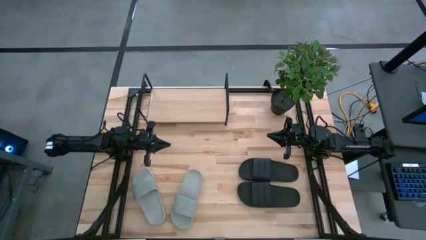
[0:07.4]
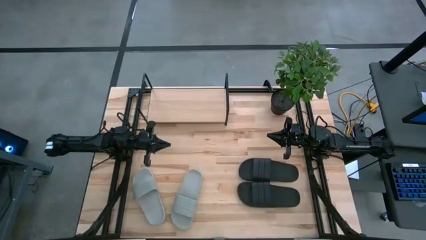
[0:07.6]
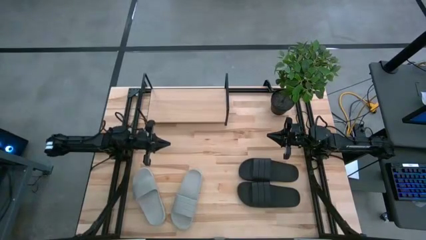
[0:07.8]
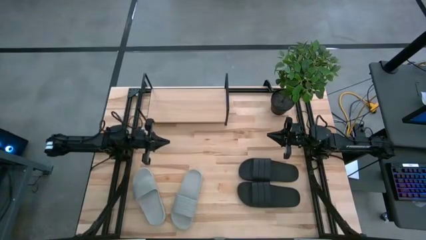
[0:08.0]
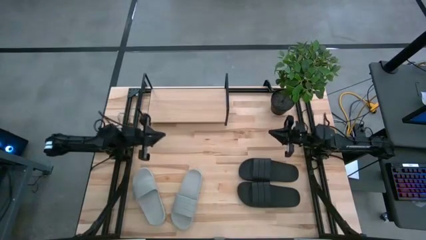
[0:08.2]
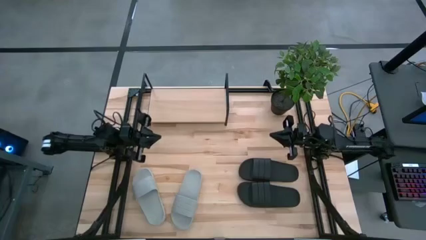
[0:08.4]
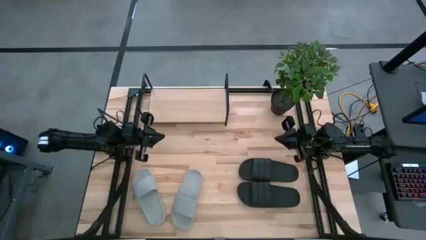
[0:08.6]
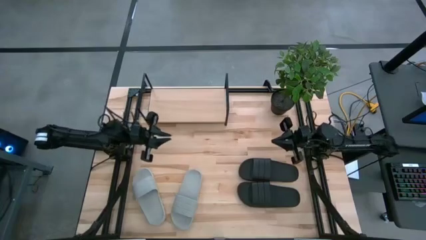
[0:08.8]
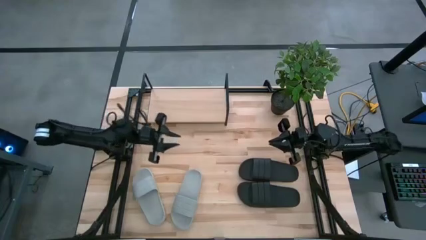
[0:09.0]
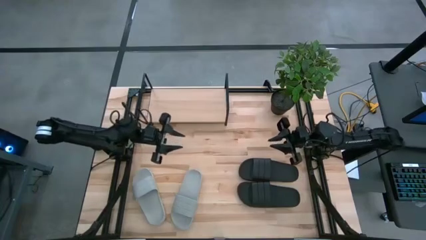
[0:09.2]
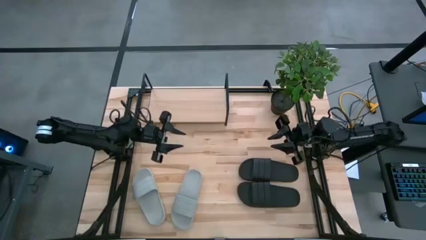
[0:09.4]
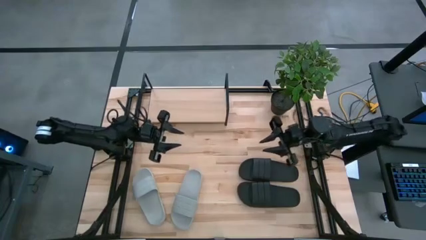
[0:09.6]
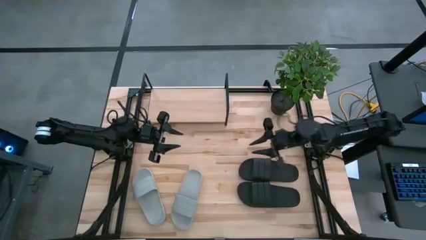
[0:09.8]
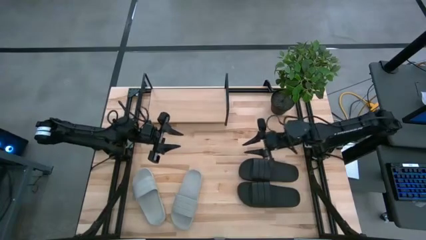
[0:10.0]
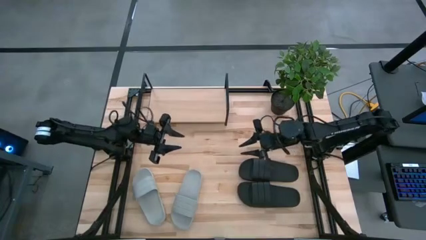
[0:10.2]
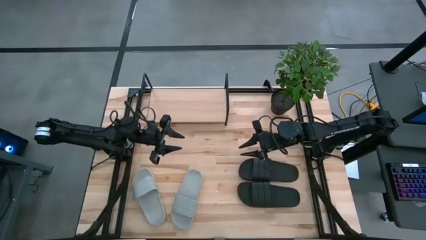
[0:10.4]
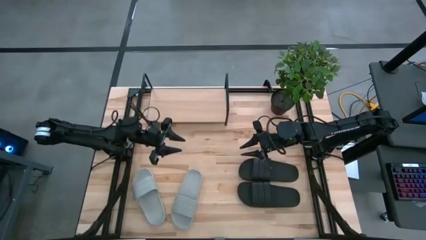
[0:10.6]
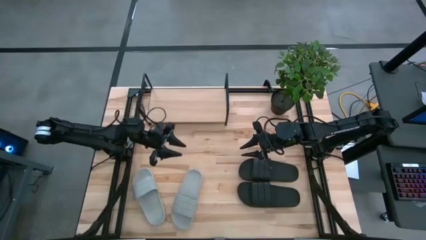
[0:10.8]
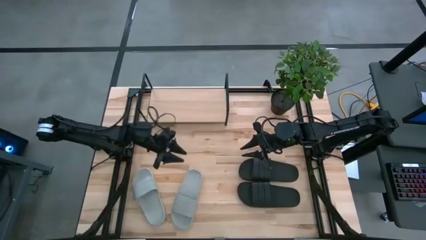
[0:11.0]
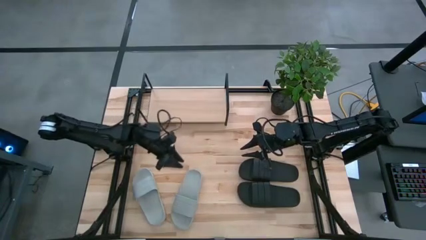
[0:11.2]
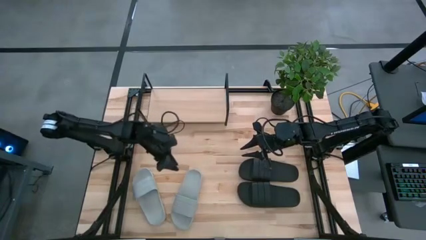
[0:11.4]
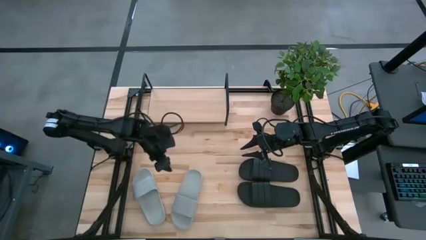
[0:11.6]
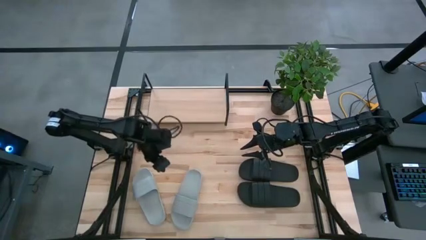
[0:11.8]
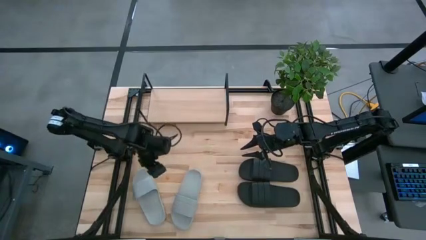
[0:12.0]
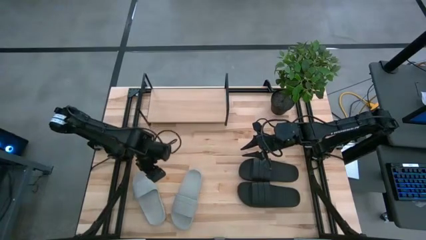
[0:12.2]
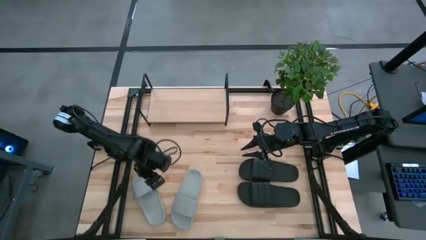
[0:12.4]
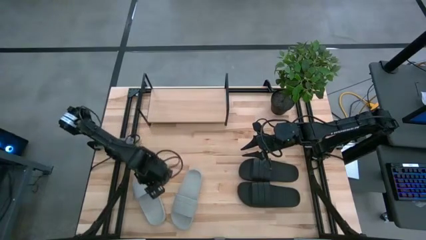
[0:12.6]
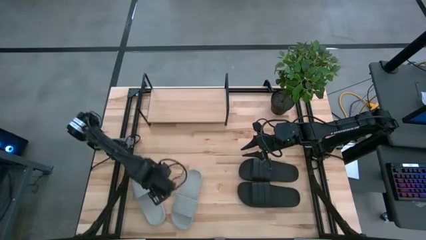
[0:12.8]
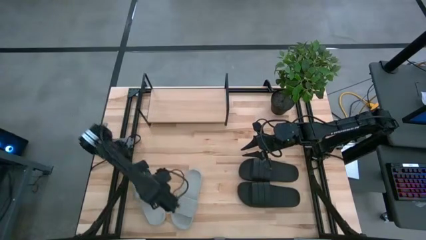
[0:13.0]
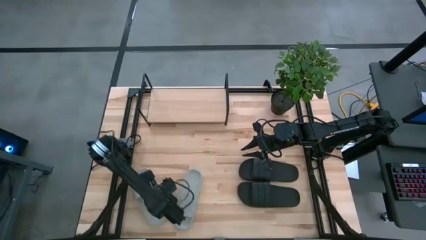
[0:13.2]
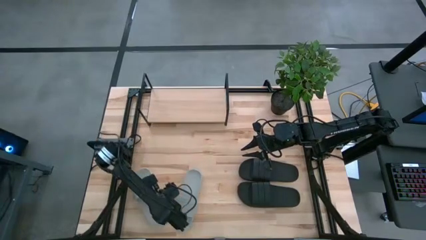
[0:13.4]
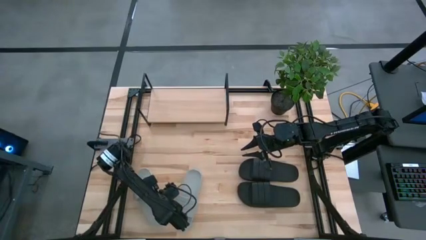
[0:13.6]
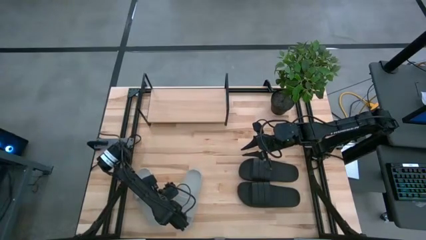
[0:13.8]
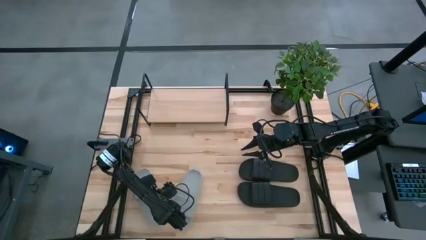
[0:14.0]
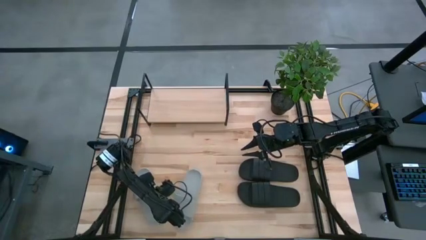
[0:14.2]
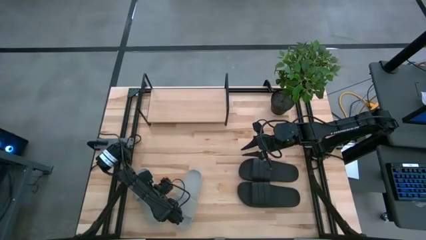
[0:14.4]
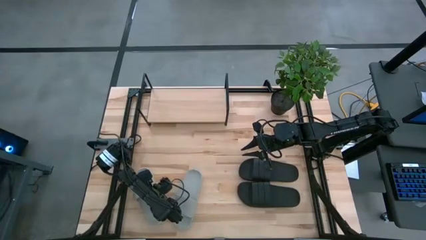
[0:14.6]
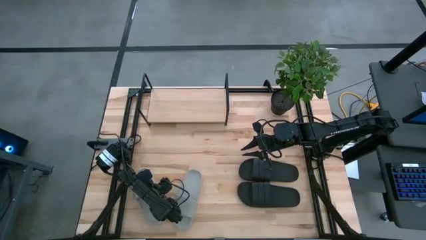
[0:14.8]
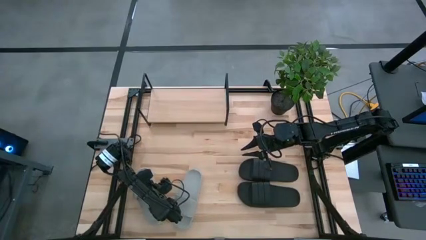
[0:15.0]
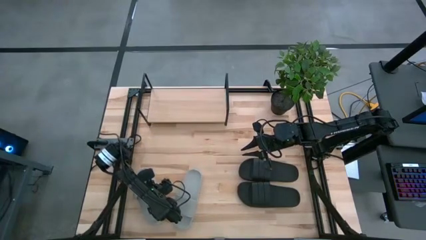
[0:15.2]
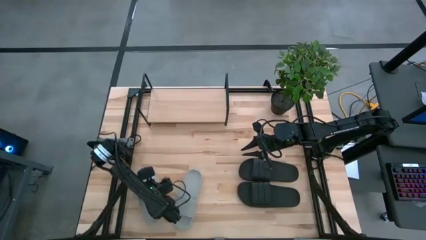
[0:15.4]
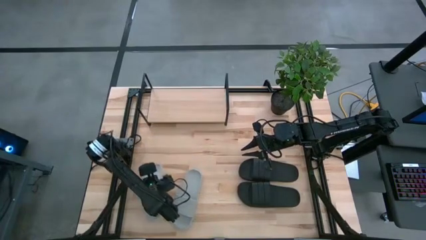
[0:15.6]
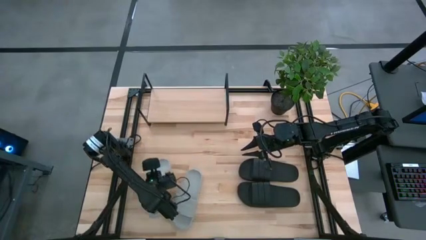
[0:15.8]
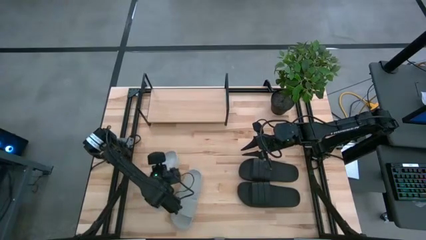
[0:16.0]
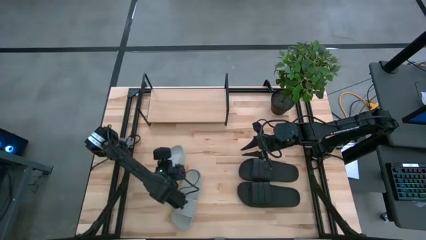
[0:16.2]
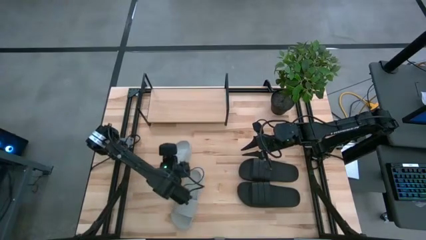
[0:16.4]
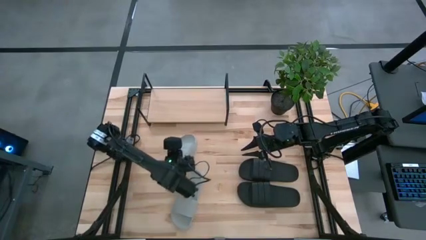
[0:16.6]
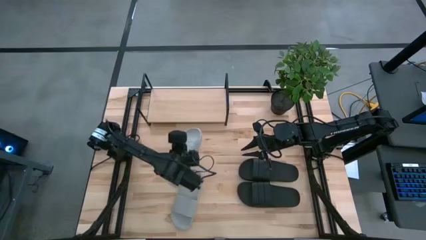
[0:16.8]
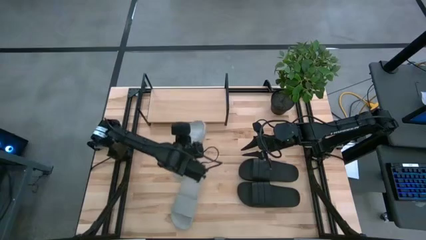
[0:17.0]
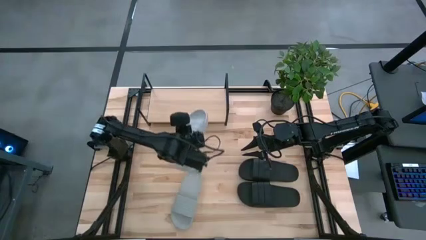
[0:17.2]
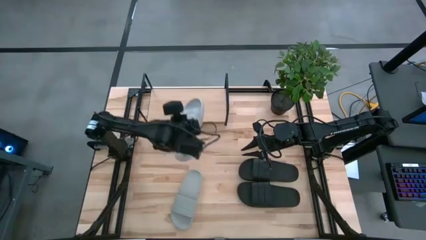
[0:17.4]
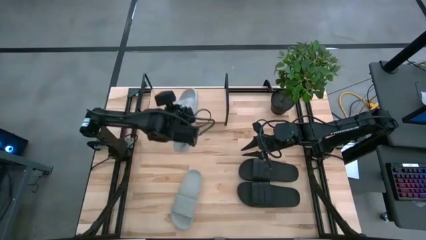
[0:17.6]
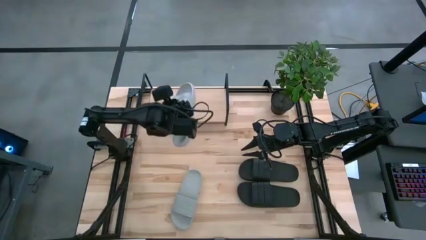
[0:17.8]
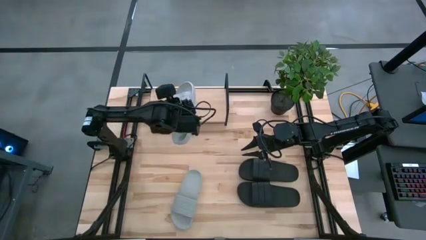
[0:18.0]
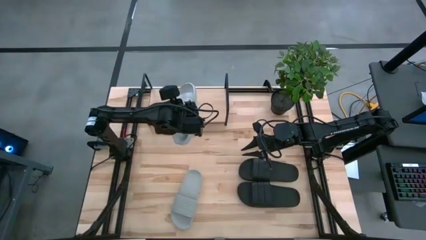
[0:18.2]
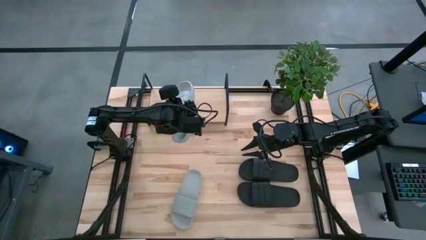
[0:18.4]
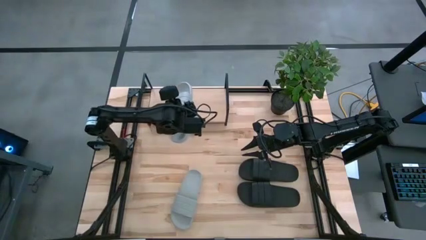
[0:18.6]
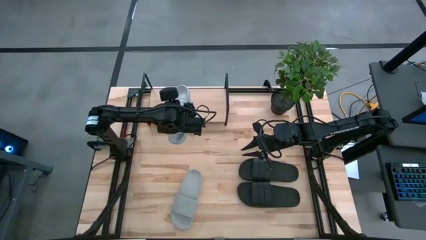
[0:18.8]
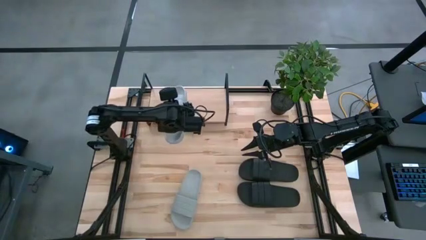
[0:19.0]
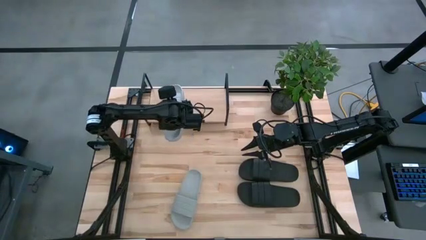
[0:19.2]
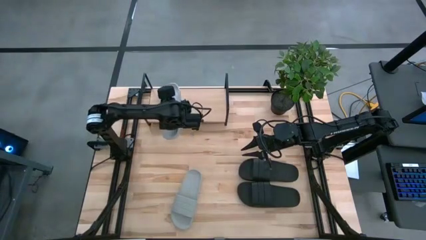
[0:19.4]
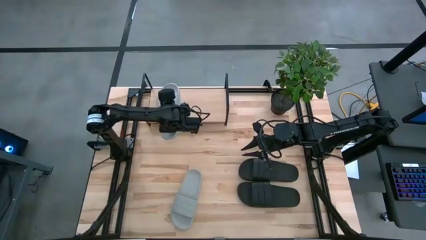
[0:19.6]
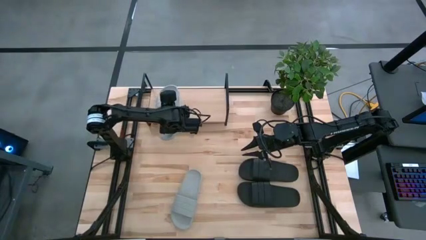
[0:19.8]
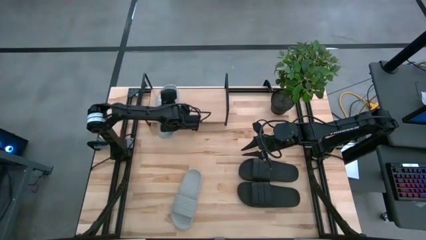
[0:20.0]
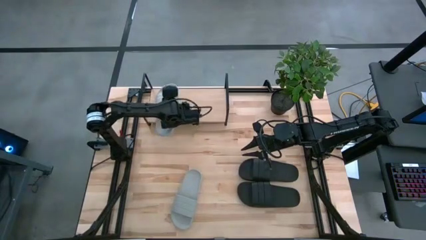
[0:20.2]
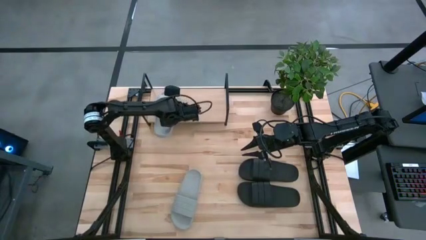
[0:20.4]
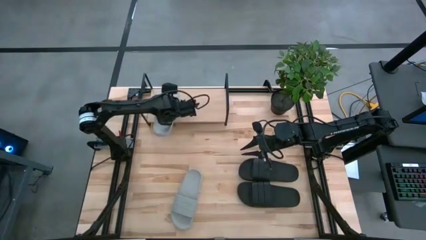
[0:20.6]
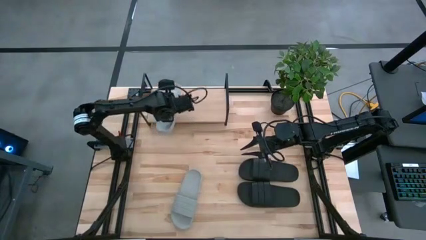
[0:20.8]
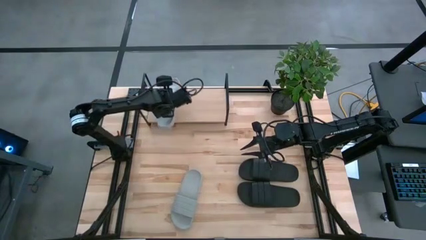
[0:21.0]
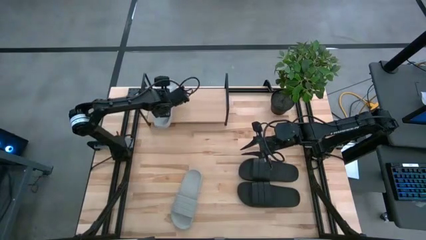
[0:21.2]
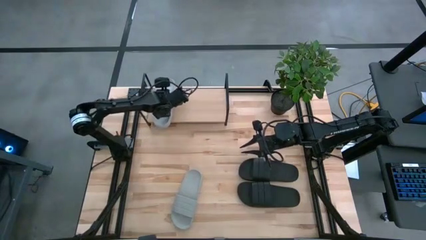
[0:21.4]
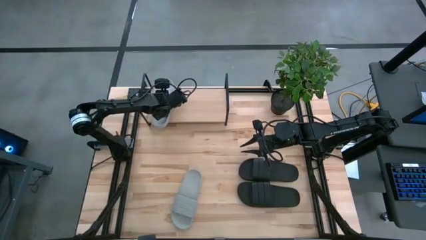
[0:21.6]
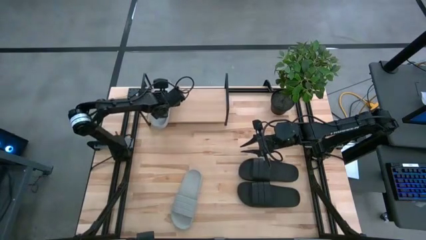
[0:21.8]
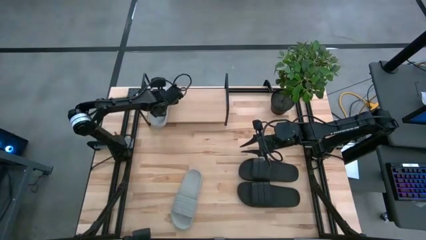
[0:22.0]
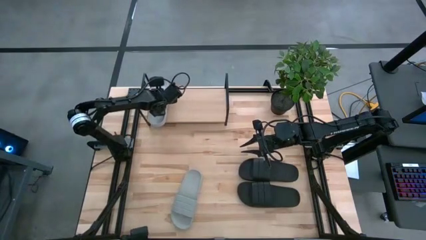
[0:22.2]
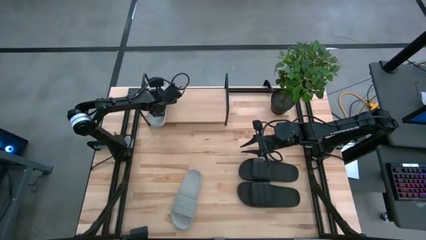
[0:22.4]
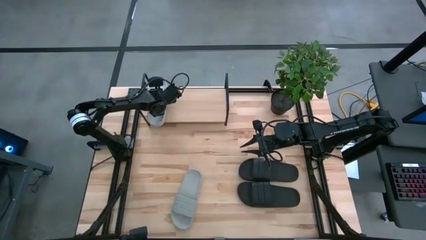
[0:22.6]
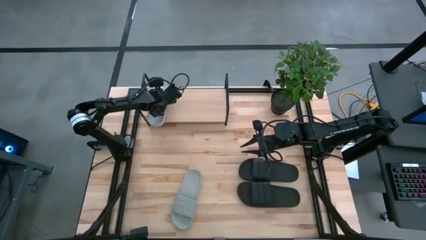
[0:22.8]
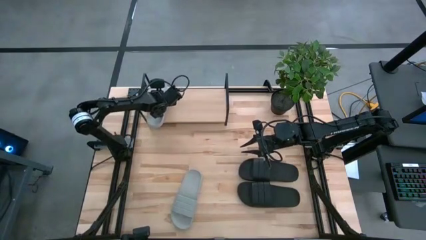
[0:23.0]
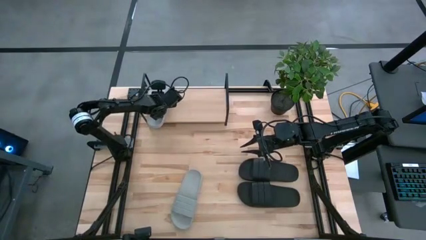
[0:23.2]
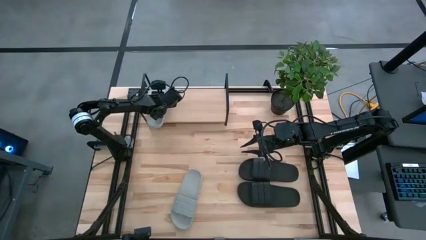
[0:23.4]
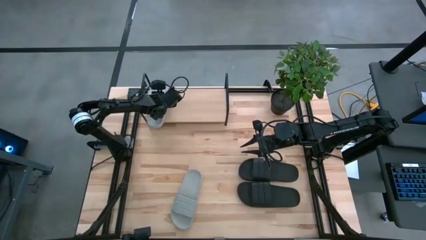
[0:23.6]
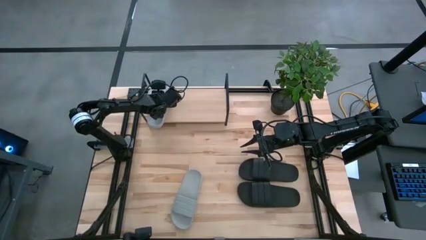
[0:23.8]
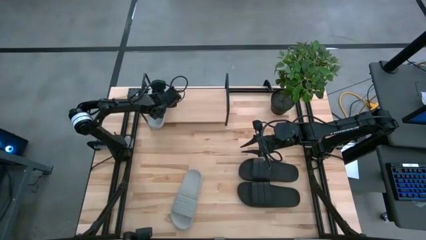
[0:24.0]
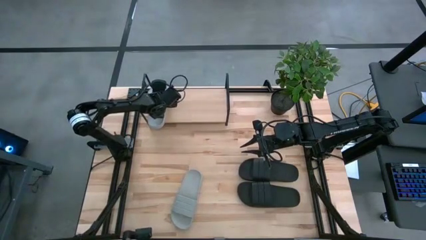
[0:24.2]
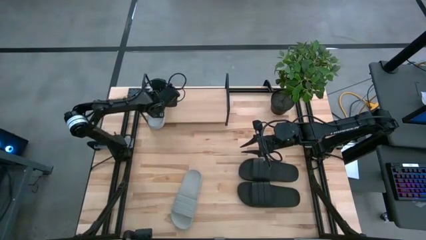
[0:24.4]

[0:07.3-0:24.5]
Task: Pick and place slides into the shelf
Put the left gray slides on the shelf
